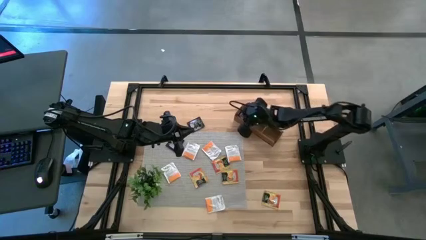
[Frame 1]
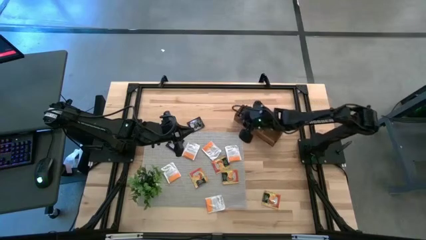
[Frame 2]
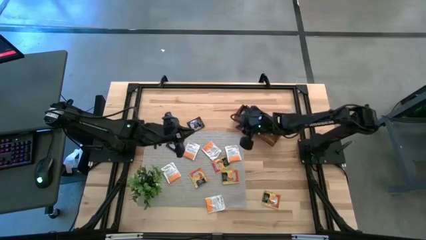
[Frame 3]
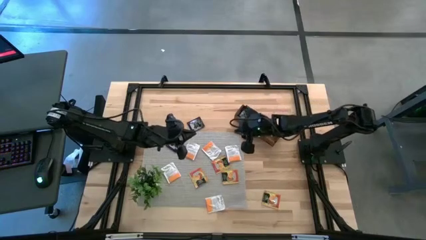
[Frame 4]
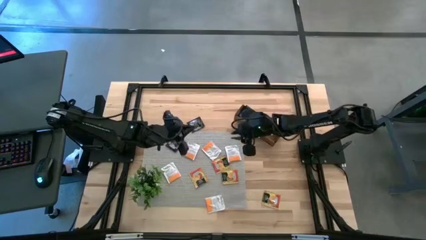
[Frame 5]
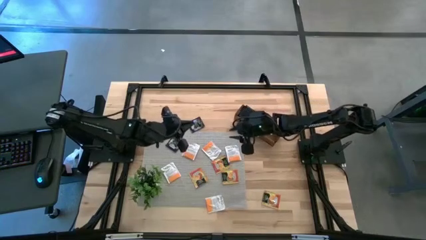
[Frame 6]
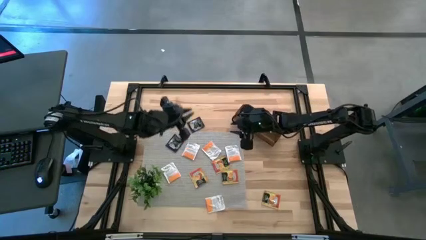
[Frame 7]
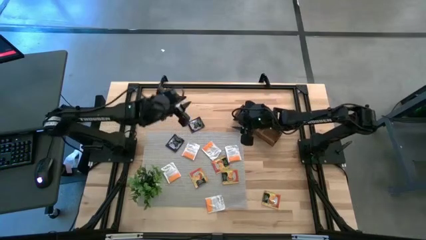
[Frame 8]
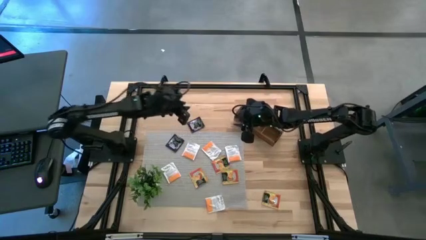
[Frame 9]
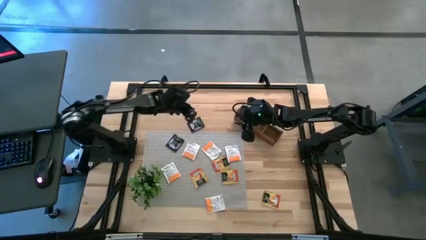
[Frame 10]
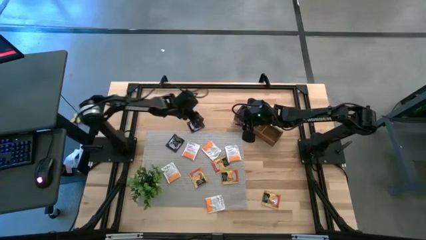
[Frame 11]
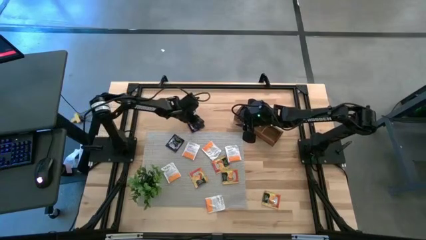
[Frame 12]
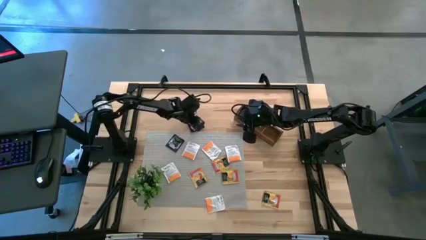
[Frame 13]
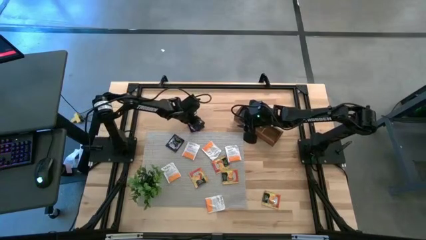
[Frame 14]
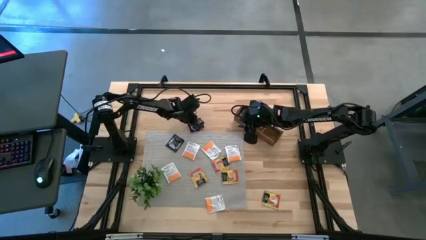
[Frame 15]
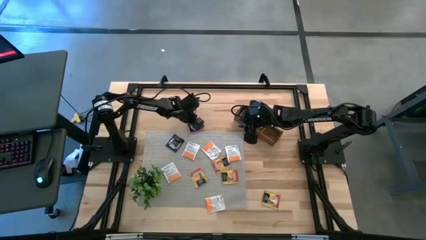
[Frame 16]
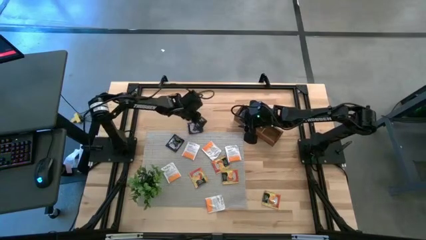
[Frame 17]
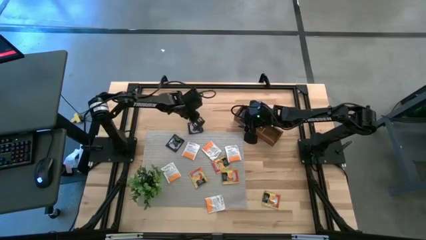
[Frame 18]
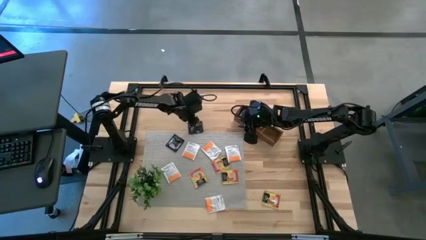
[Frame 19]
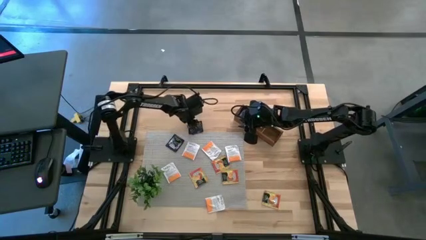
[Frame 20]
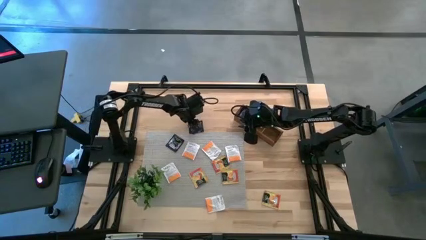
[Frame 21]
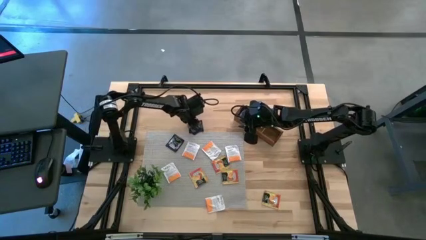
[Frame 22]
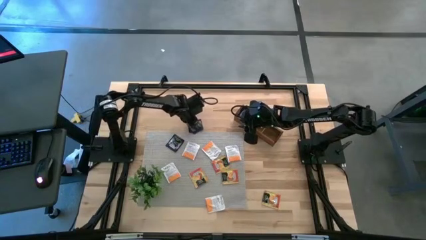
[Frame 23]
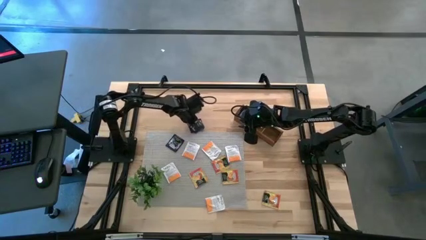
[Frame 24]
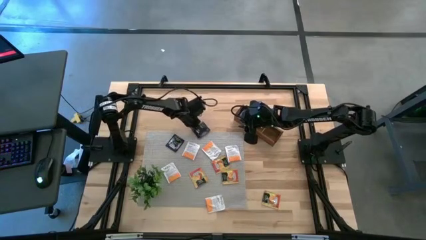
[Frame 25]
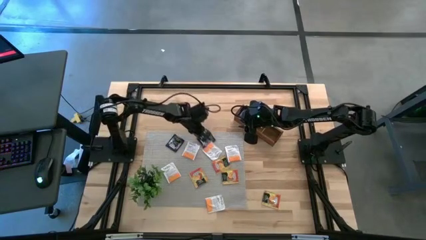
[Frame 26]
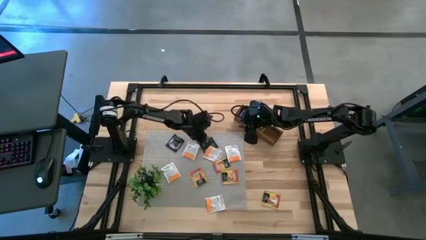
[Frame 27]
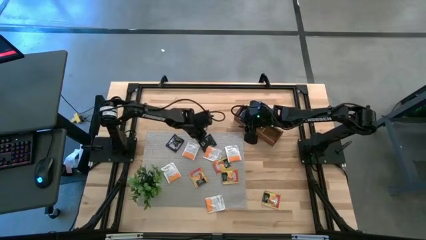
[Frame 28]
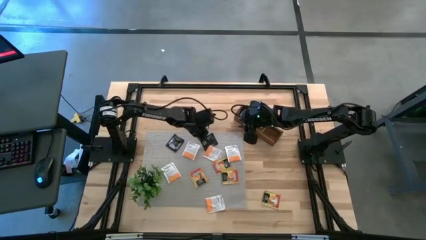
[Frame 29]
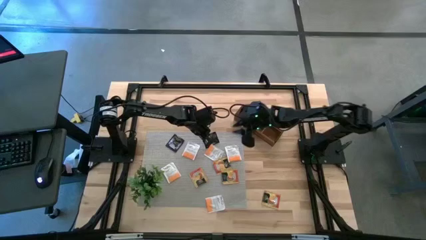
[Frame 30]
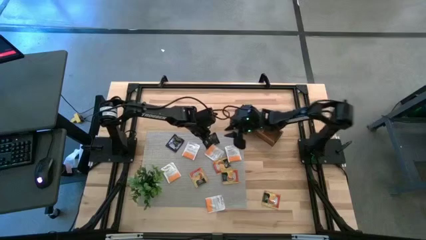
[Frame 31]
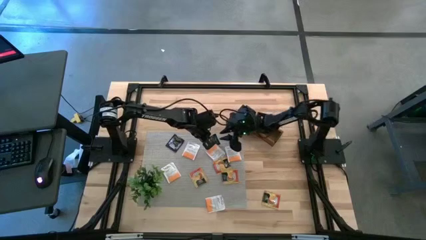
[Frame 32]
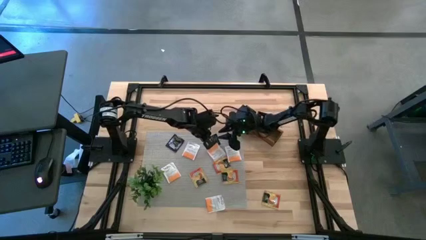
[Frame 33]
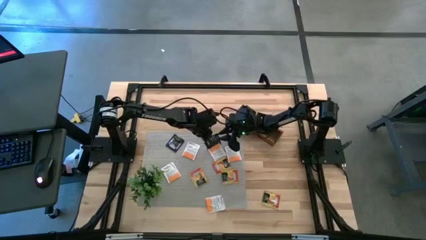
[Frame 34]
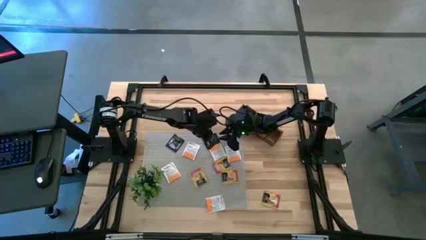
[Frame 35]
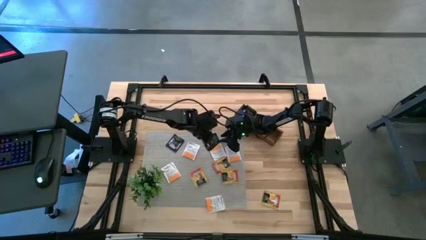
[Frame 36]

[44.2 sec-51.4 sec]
Task: Pick & Place Tea
Put the black tea bag into the left section of the wooden organizer

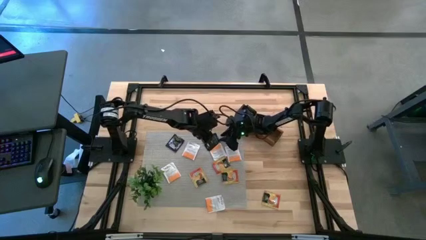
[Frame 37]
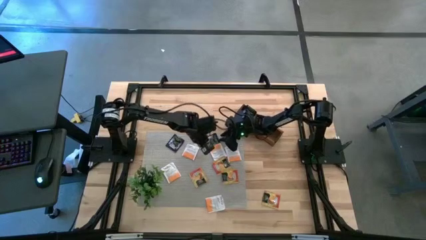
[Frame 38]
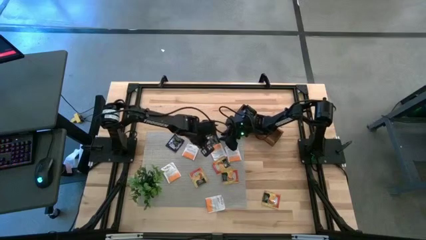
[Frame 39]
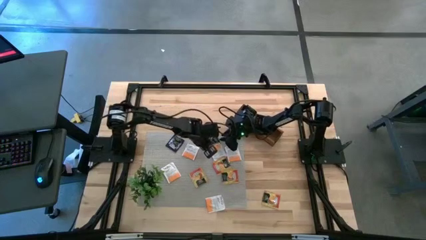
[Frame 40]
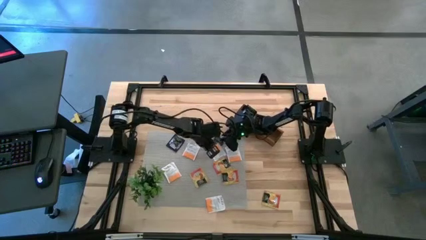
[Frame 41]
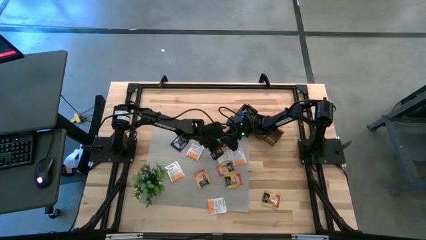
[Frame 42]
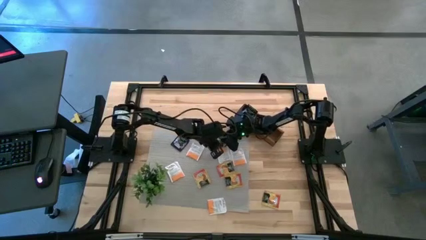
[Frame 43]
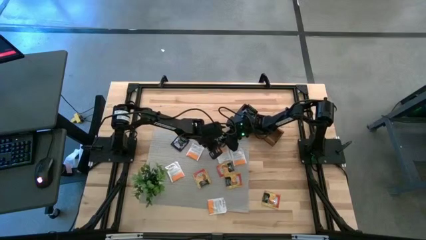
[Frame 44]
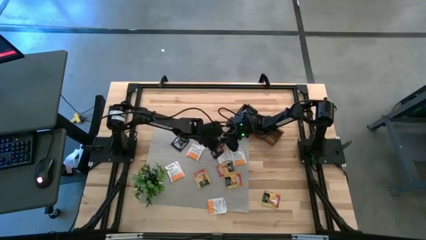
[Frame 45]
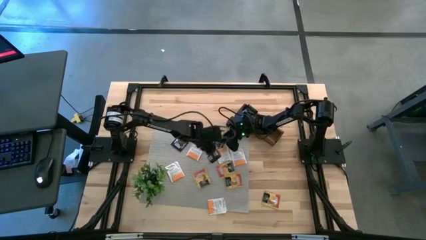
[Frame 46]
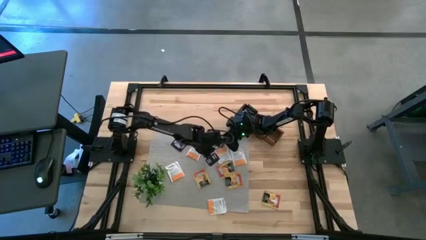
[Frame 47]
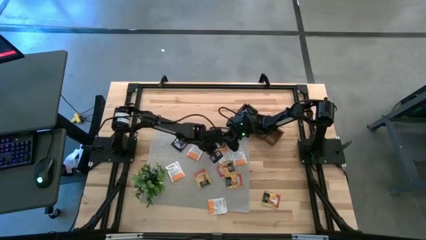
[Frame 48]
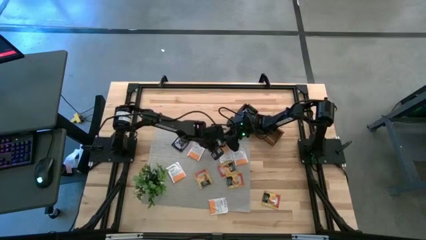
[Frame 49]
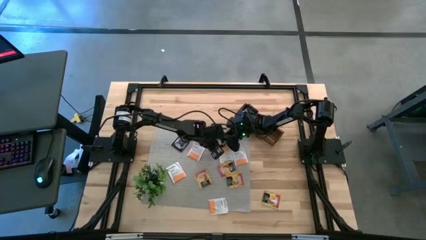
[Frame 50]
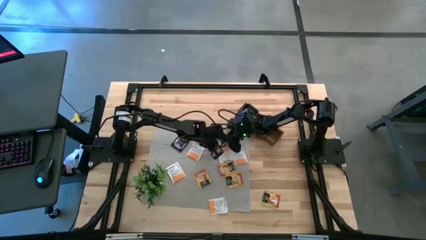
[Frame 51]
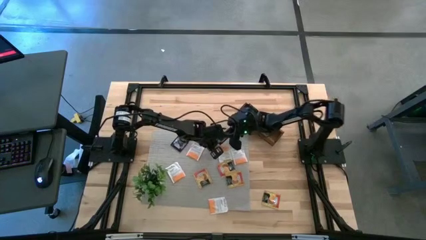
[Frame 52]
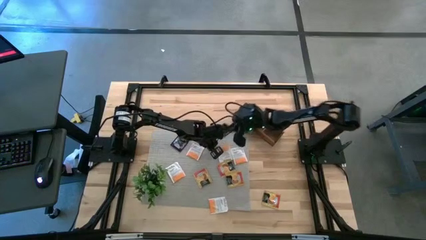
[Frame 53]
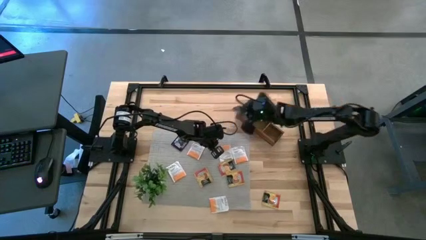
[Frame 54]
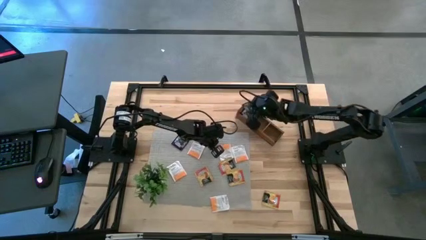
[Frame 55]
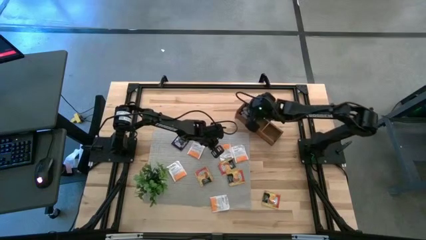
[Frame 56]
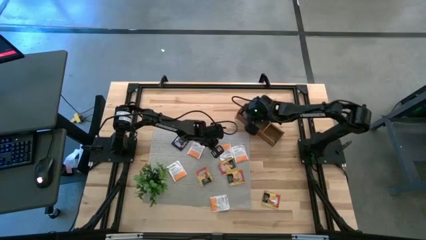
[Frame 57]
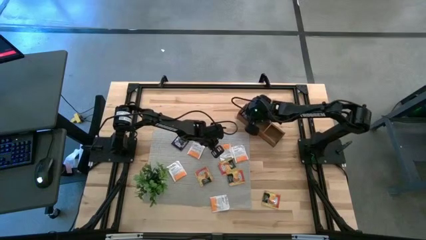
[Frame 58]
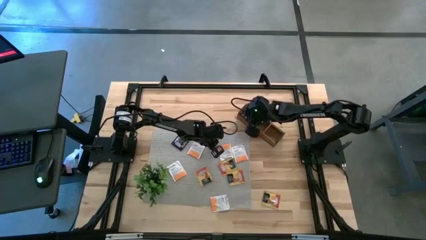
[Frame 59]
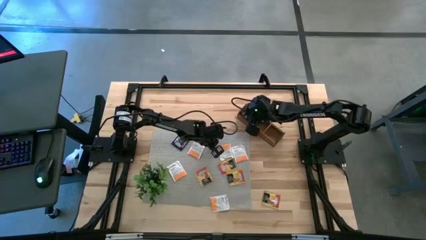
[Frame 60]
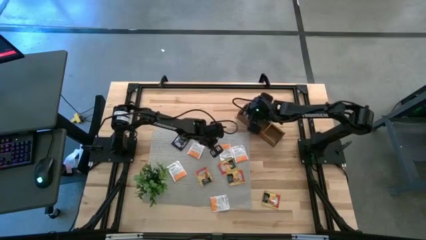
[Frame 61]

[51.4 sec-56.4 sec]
Put the black tea bag into the left section of the wooden organizer

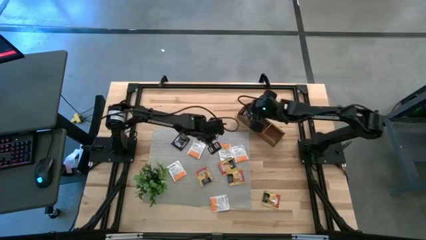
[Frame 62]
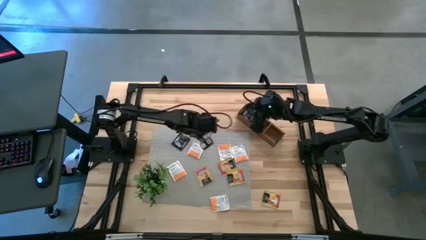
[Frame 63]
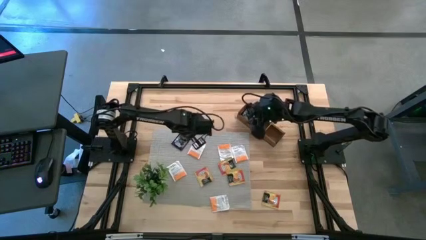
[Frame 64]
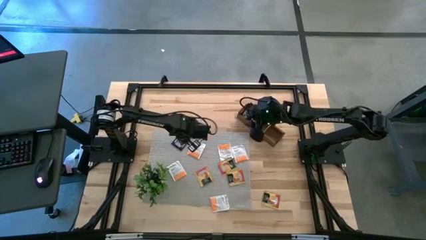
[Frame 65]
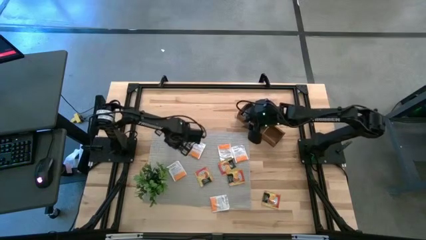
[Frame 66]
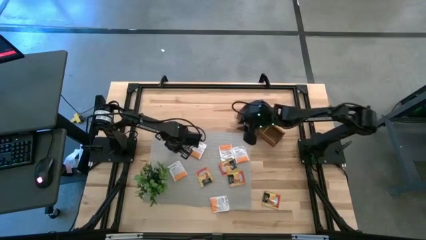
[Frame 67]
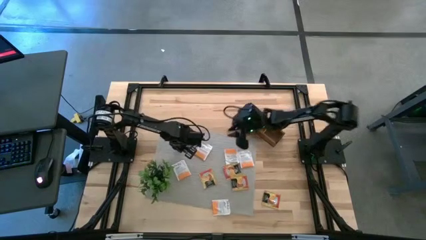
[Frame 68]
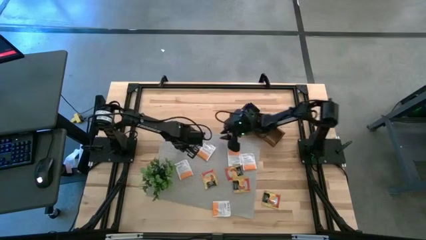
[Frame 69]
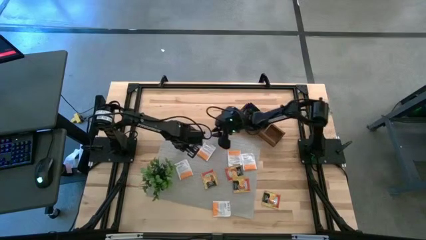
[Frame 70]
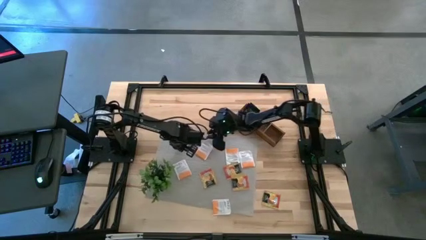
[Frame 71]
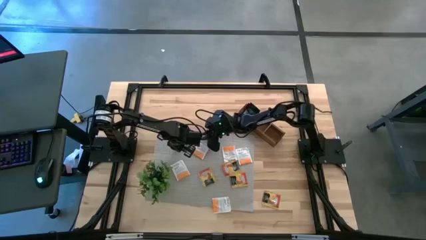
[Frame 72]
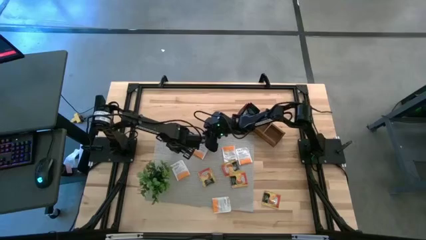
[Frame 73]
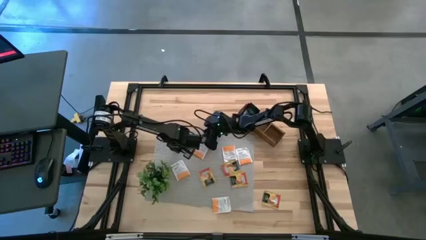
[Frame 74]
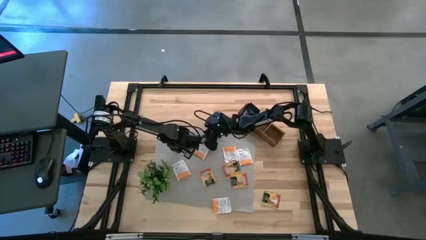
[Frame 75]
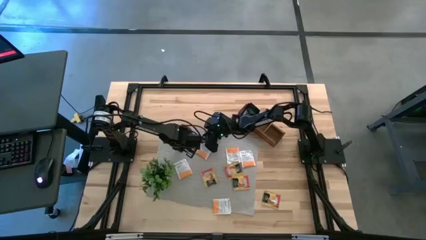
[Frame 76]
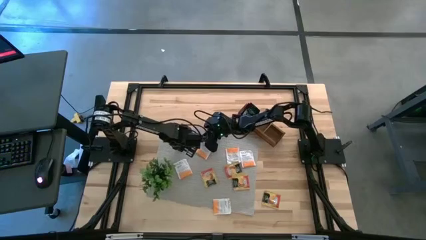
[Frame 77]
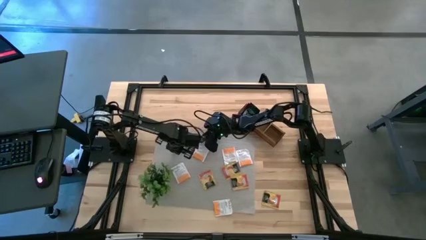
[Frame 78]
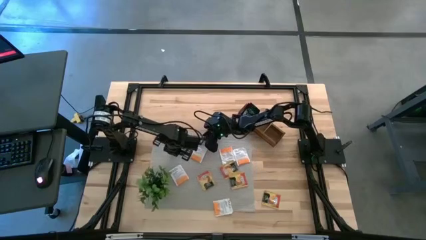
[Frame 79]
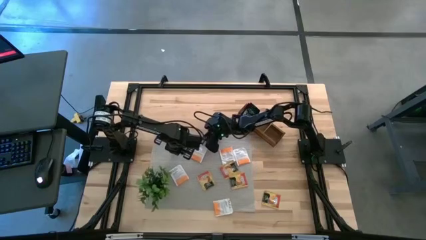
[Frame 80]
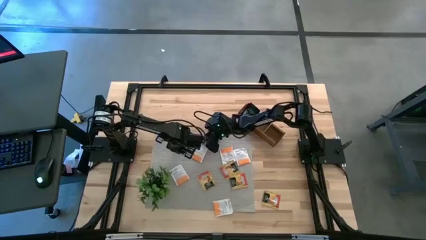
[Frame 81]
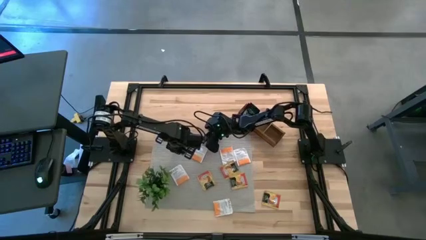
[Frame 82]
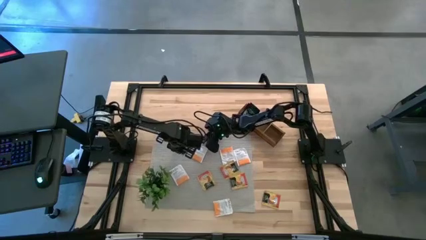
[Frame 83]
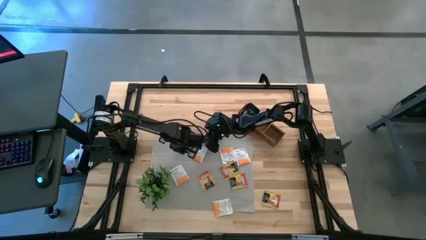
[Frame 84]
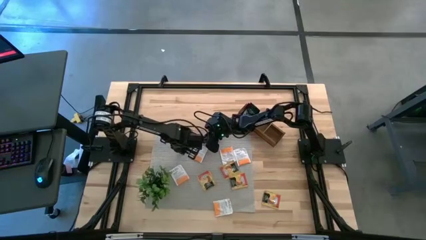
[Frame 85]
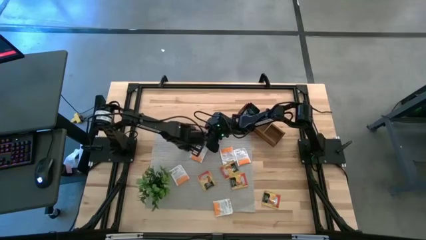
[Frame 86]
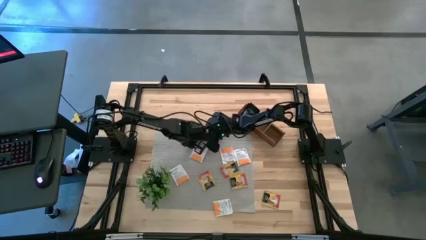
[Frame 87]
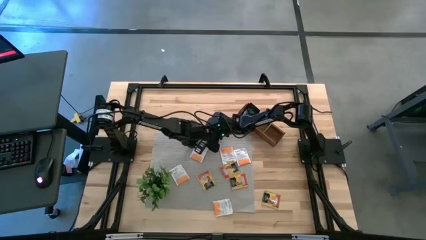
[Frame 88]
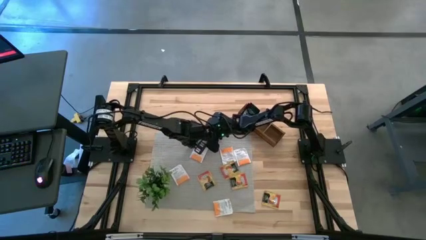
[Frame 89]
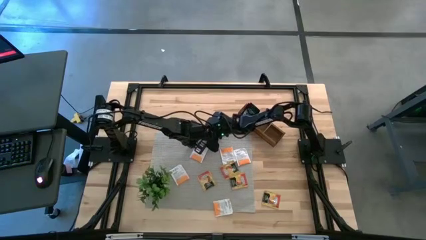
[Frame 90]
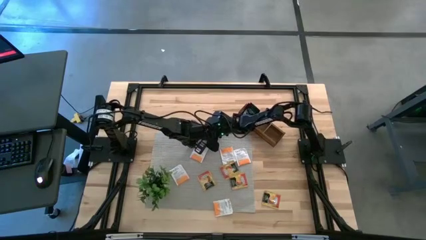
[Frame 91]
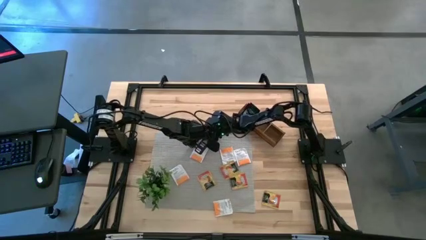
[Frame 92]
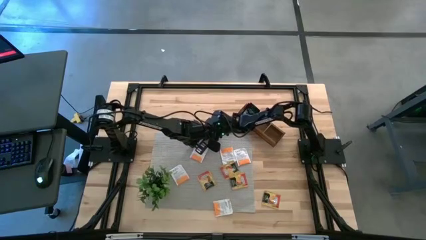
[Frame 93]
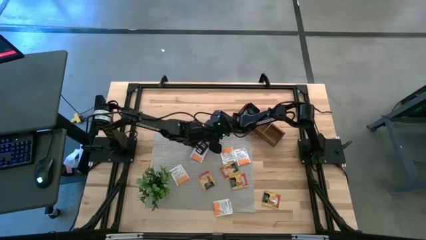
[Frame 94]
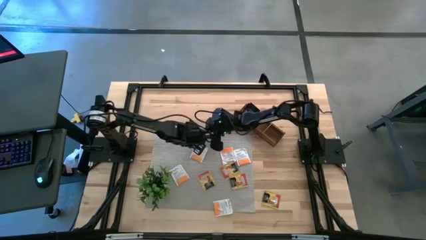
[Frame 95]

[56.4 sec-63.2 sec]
Put the black tea bag into the left section of the wooden organizer
